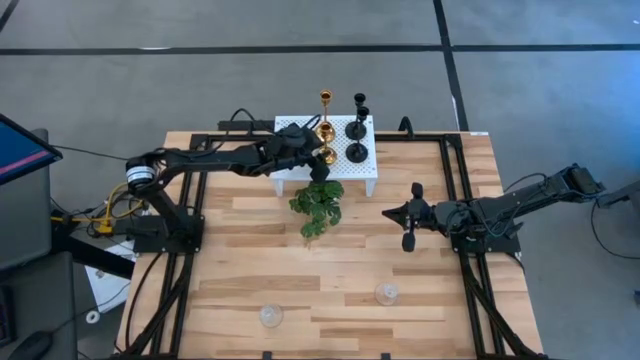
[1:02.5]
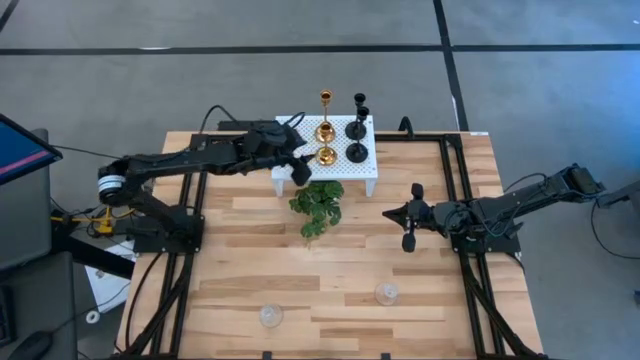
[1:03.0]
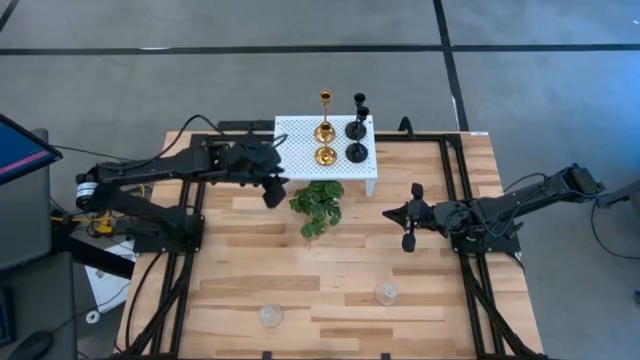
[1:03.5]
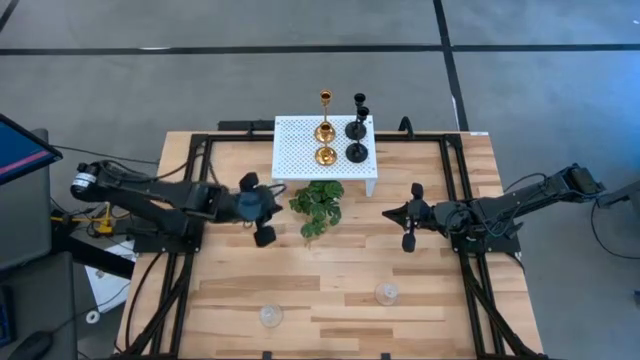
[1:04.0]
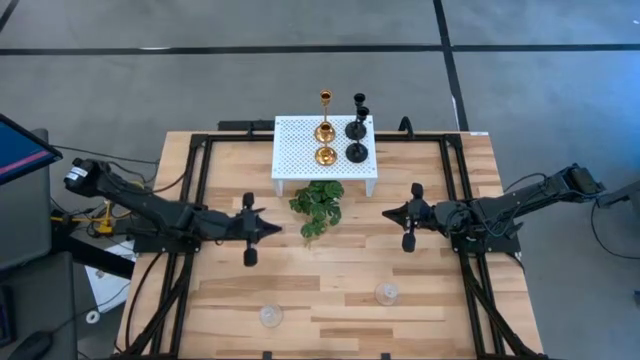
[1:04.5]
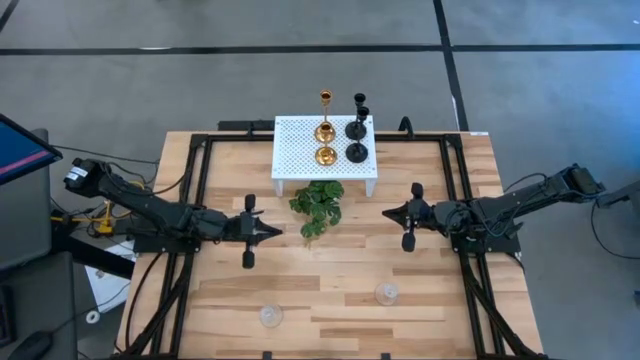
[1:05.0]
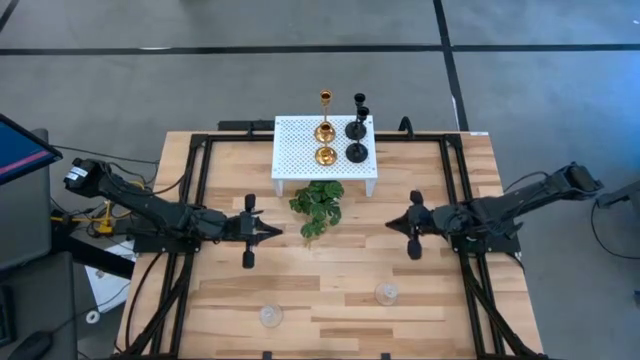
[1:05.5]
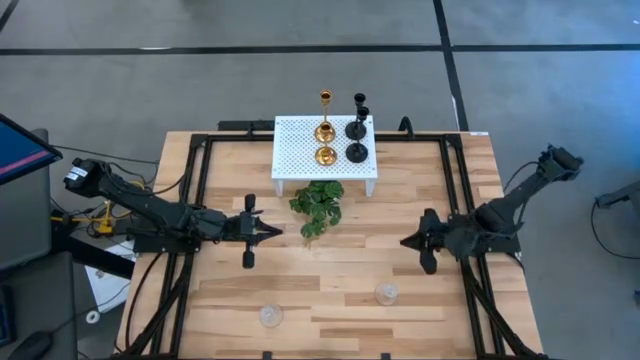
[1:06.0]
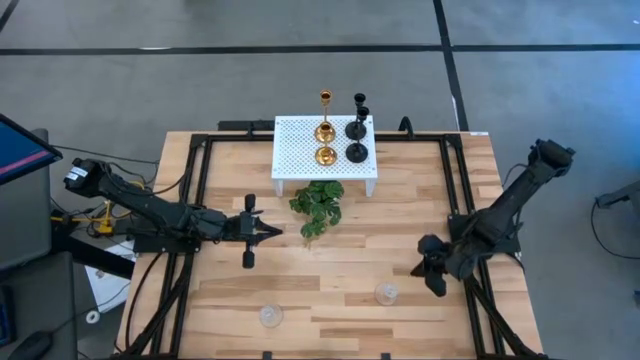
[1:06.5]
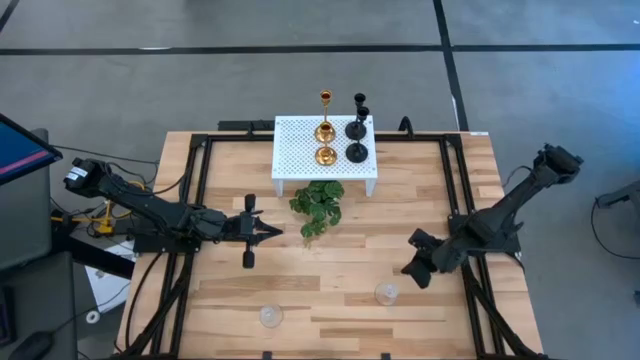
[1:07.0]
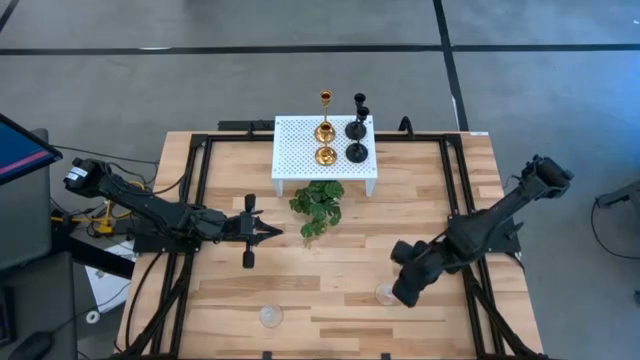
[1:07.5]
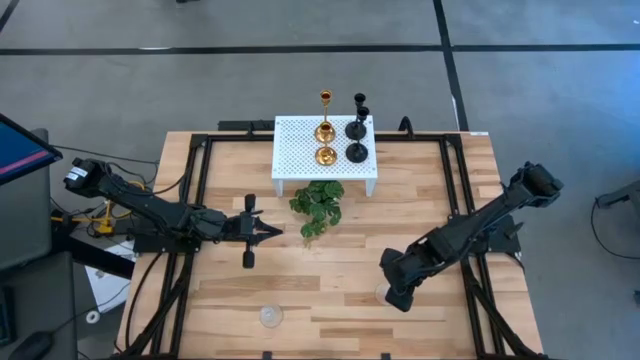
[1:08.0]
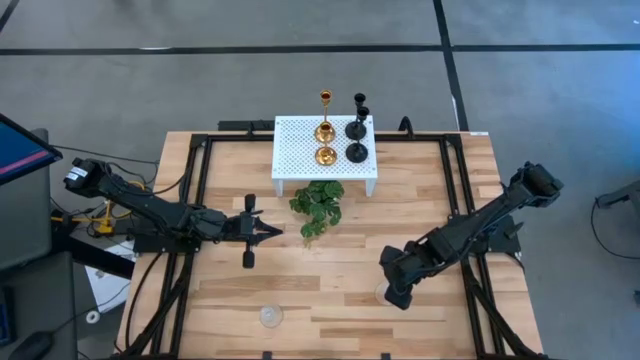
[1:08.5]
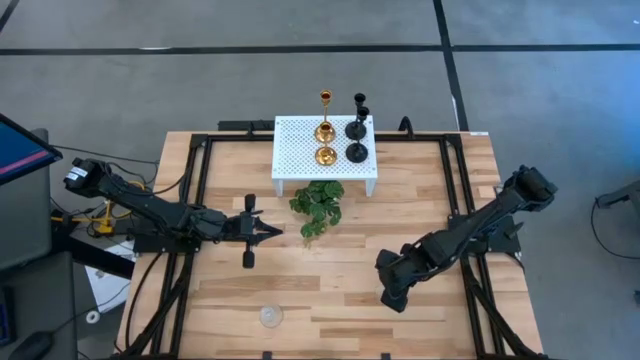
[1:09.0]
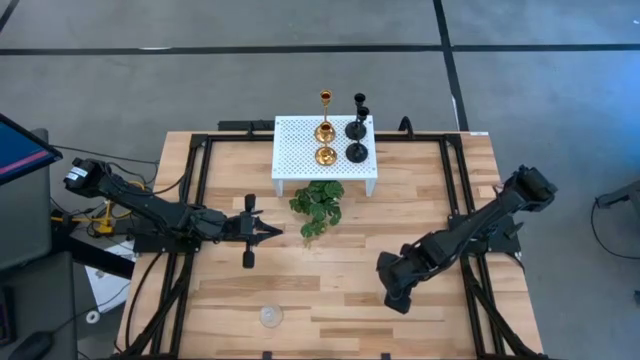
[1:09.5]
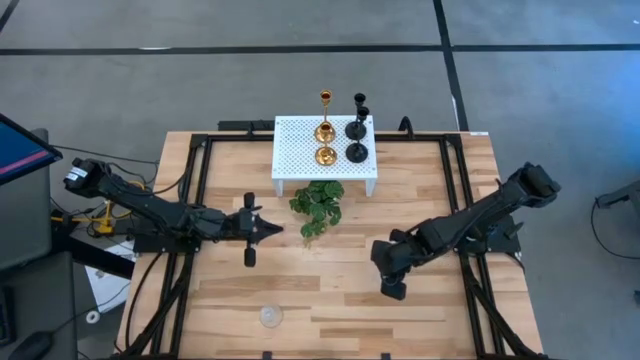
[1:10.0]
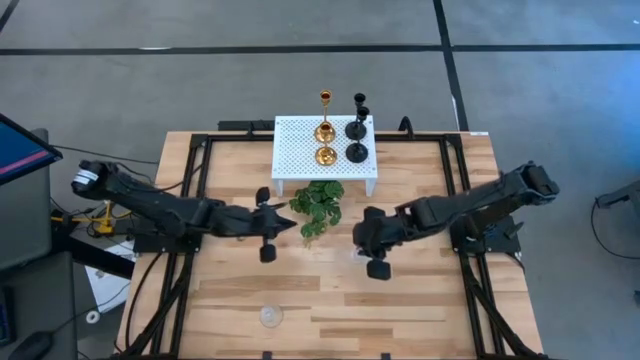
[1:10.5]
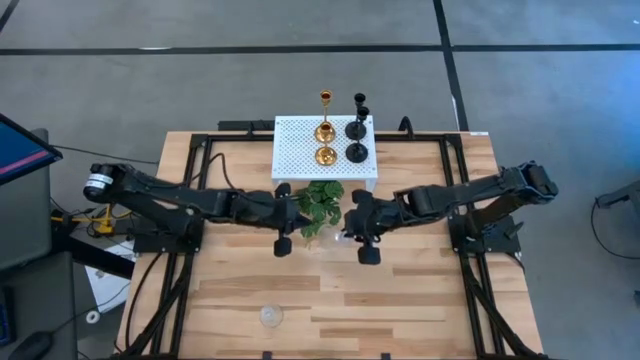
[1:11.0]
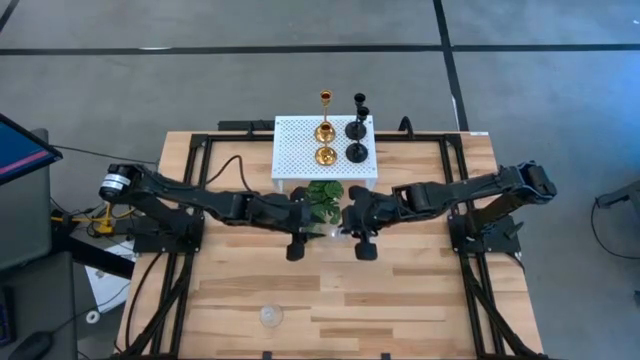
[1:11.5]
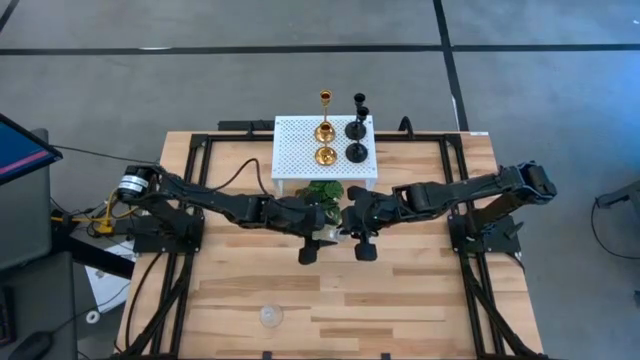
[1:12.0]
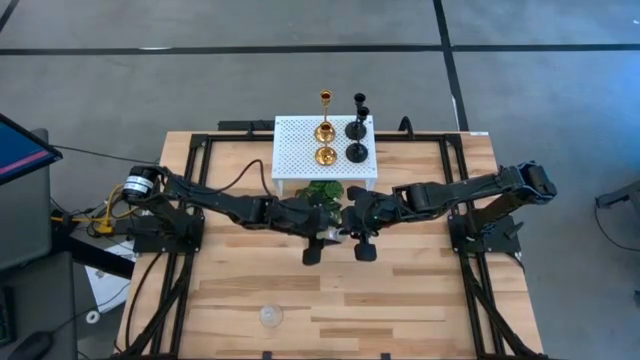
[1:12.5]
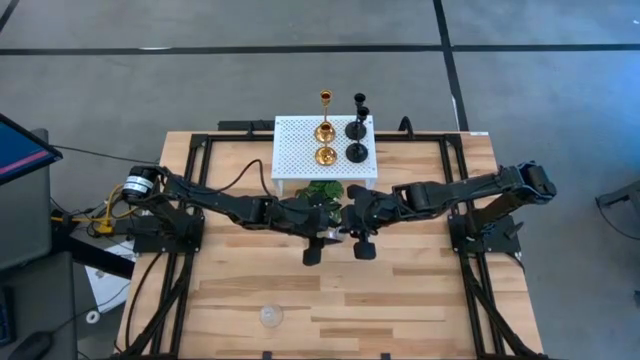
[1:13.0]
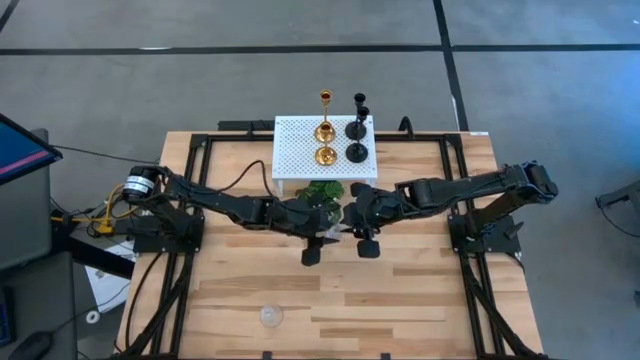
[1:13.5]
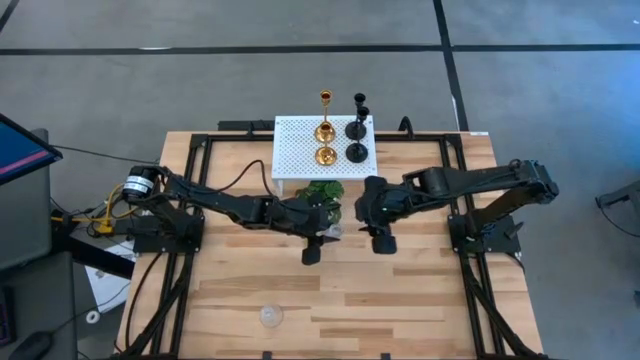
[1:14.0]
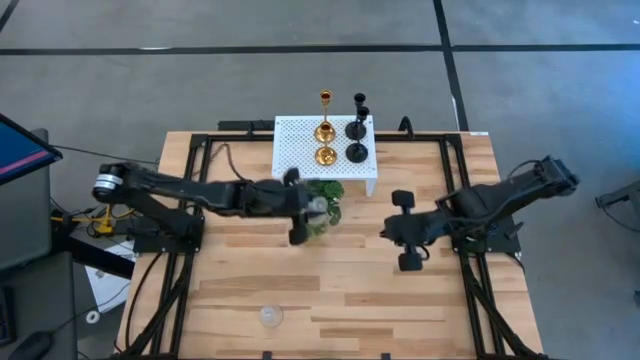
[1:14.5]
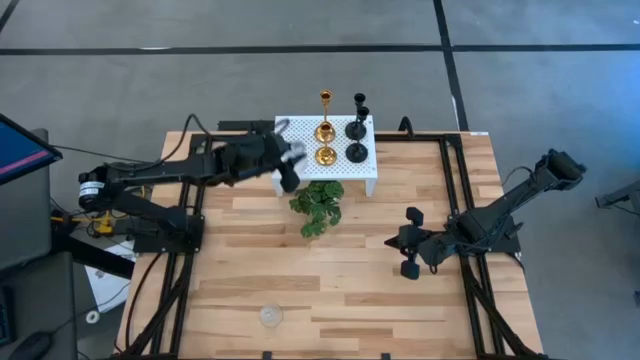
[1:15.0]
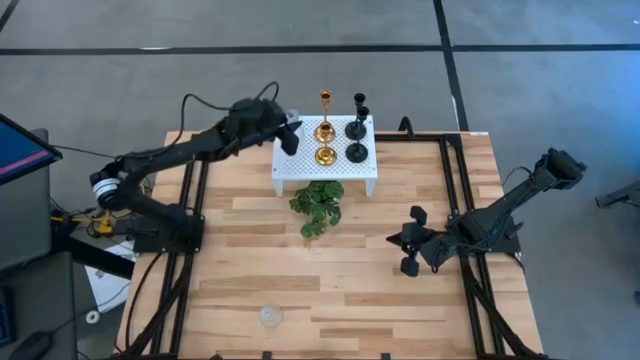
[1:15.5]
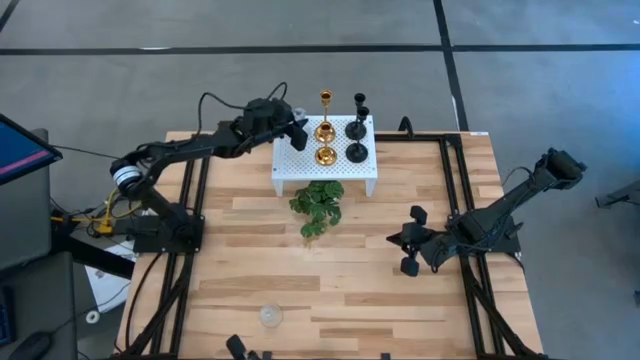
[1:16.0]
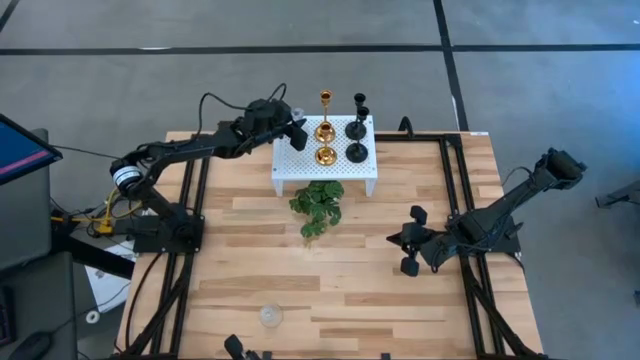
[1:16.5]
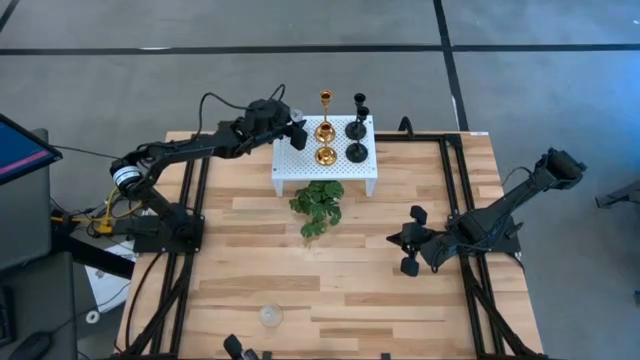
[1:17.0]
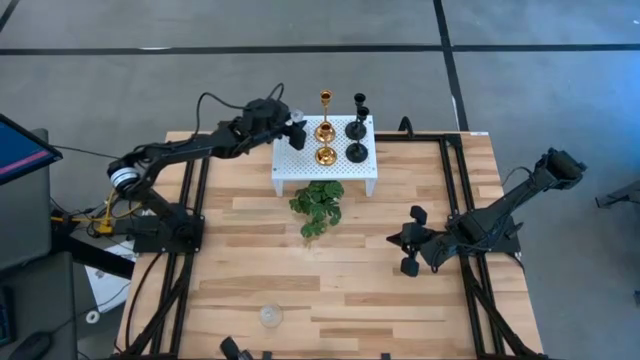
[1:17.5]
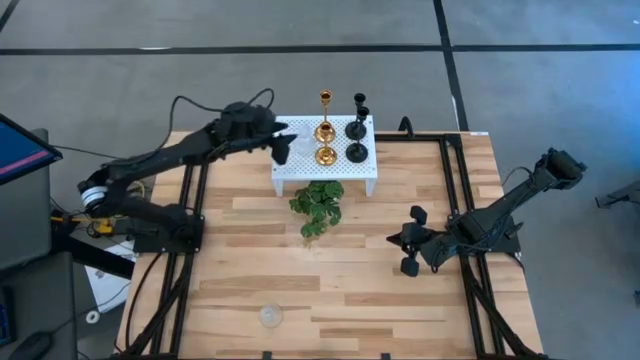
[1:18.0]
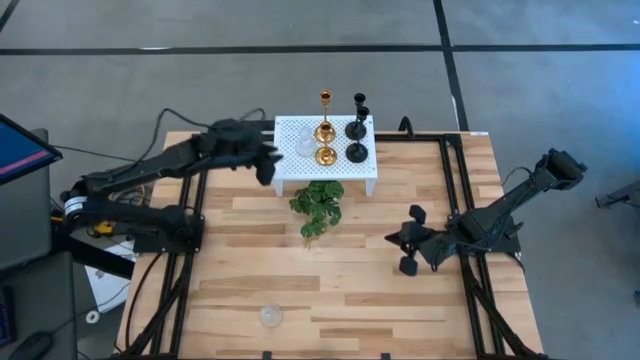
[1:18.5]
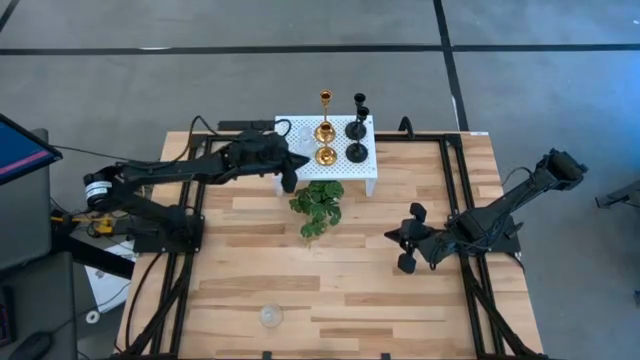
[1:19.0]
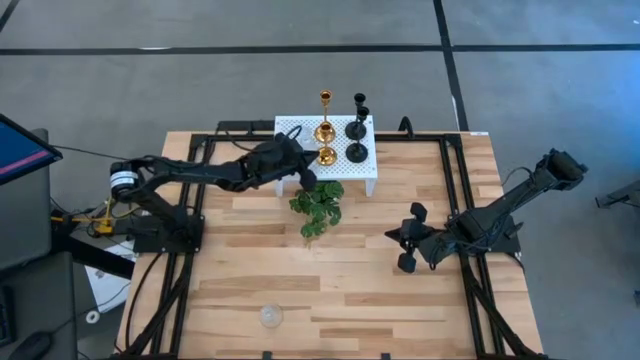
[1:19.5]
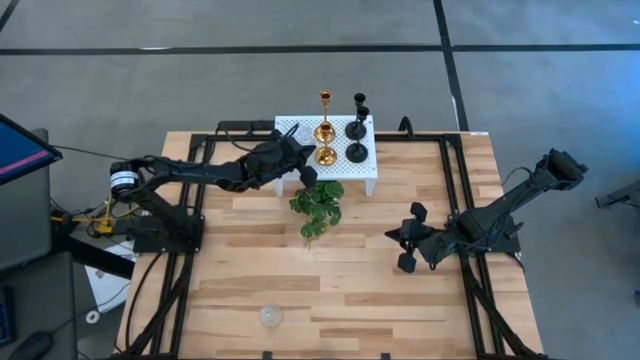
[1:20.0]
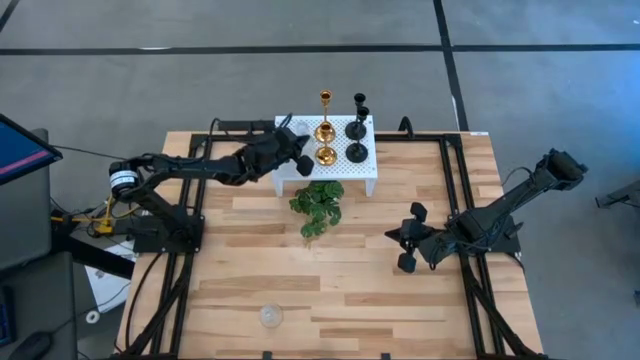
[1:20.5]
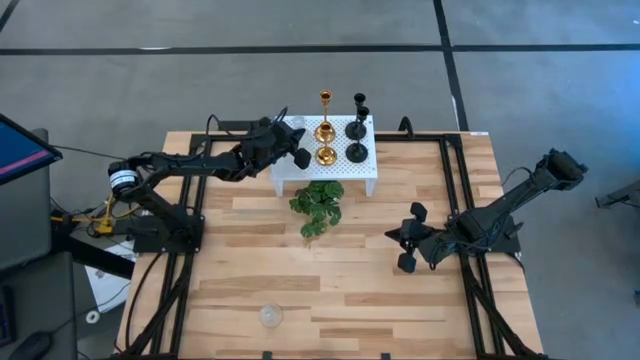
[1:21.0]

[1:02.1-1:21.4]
Task: Pick & Place candle stick holders
Put the right transparent candle holder on the shelf
